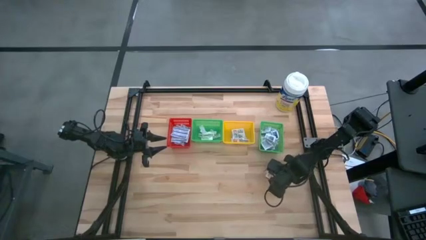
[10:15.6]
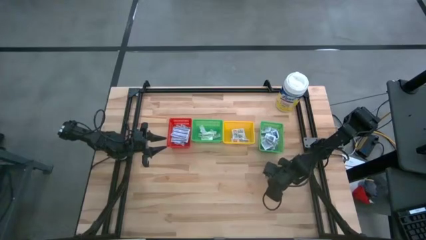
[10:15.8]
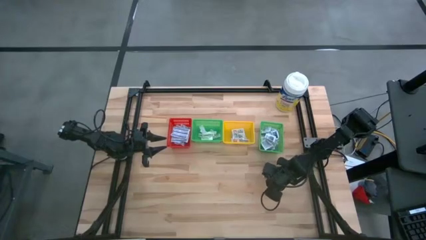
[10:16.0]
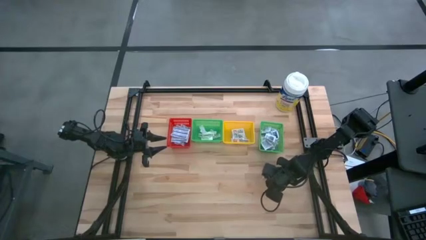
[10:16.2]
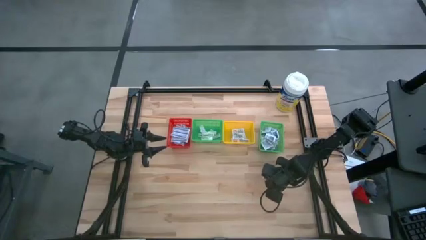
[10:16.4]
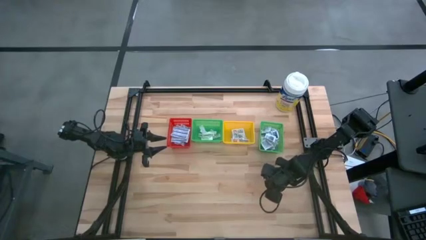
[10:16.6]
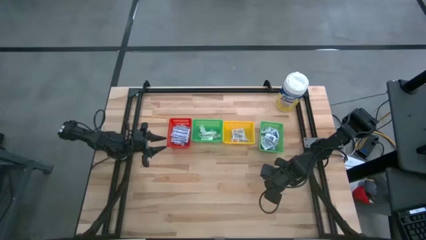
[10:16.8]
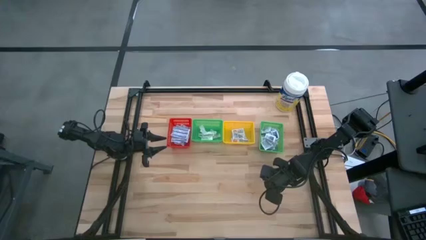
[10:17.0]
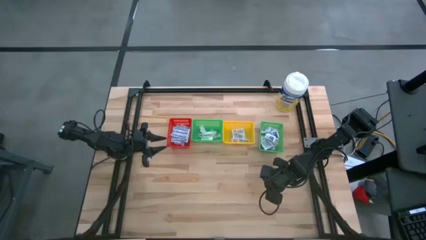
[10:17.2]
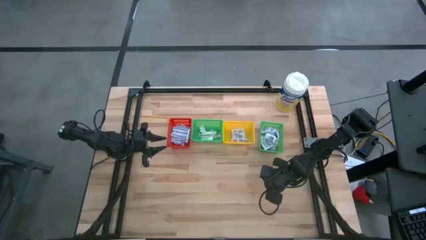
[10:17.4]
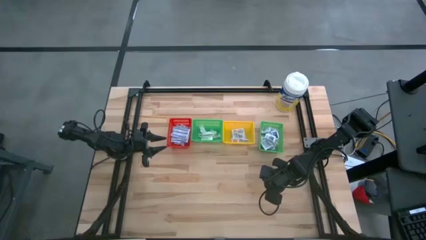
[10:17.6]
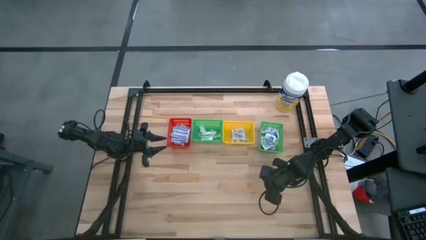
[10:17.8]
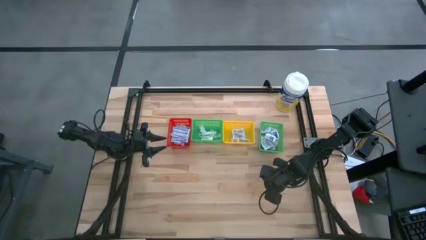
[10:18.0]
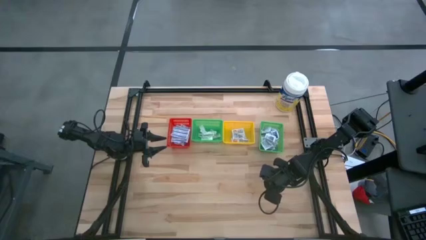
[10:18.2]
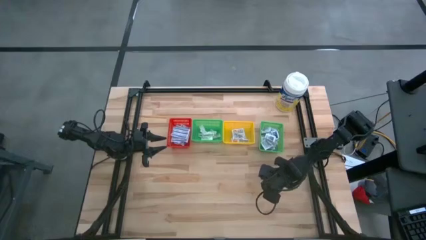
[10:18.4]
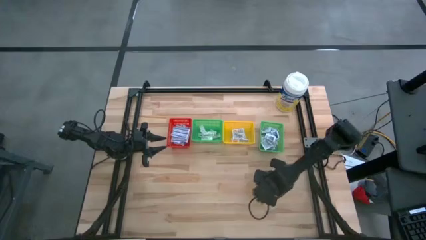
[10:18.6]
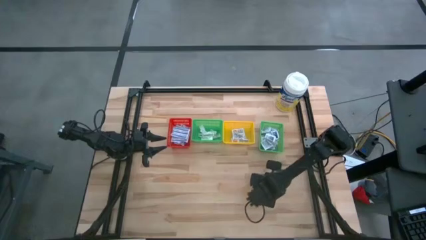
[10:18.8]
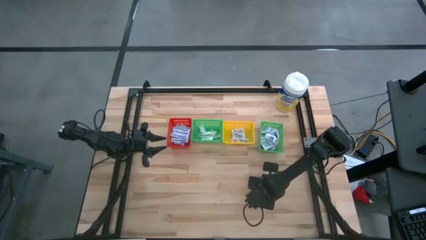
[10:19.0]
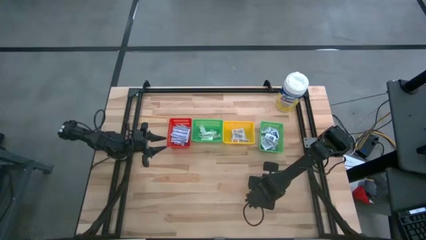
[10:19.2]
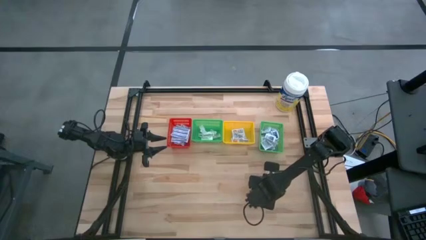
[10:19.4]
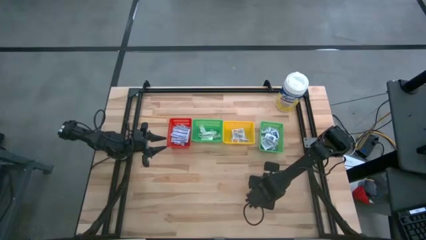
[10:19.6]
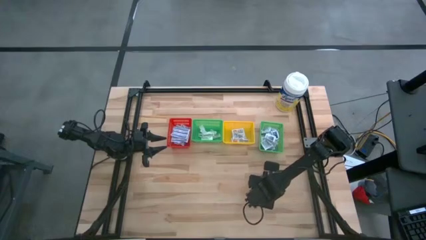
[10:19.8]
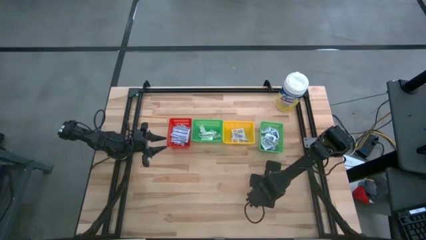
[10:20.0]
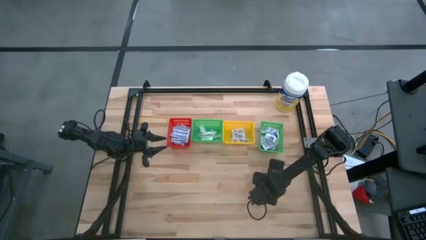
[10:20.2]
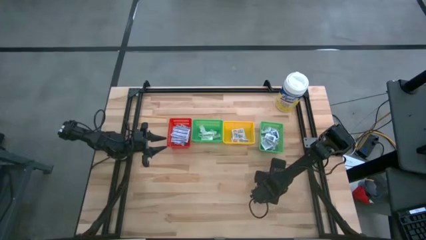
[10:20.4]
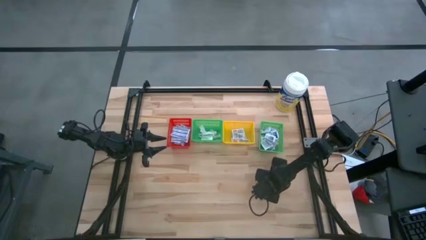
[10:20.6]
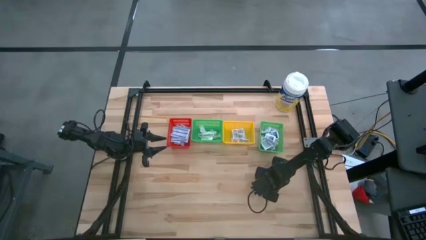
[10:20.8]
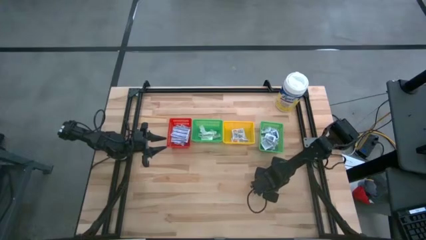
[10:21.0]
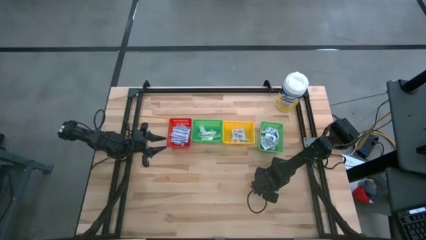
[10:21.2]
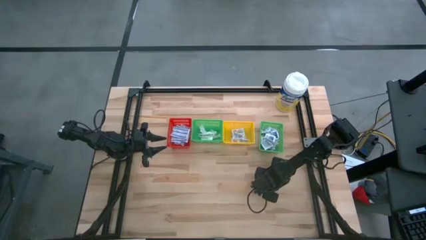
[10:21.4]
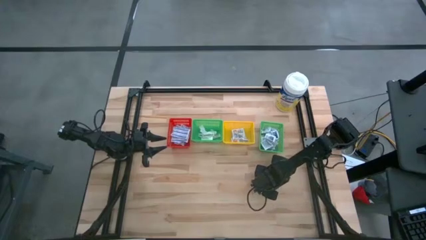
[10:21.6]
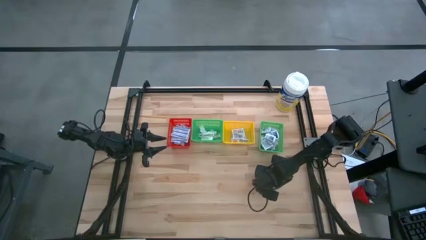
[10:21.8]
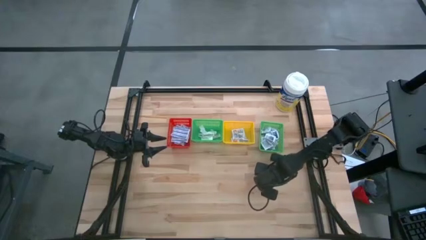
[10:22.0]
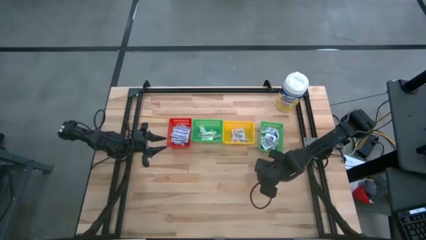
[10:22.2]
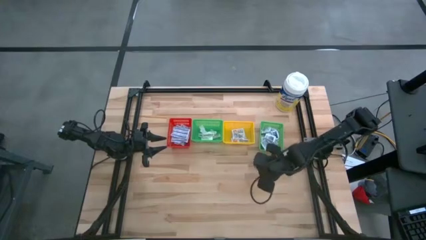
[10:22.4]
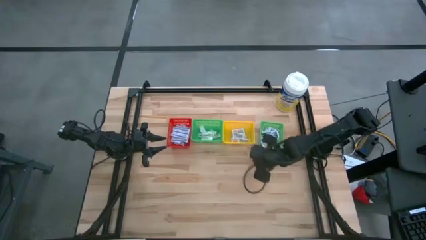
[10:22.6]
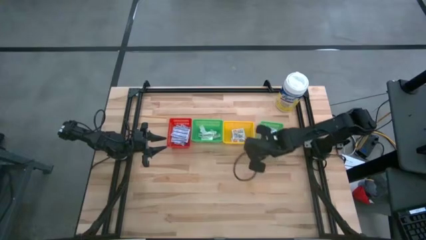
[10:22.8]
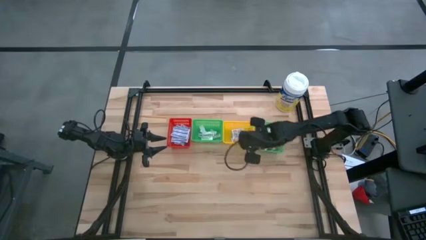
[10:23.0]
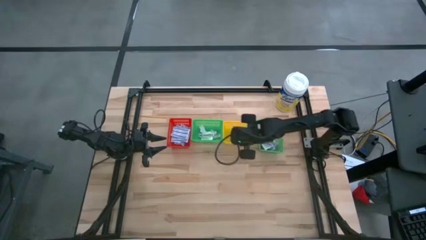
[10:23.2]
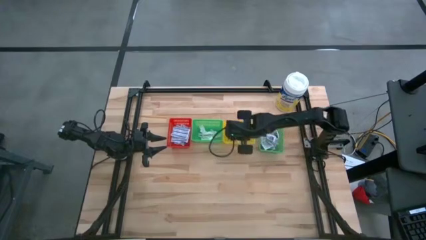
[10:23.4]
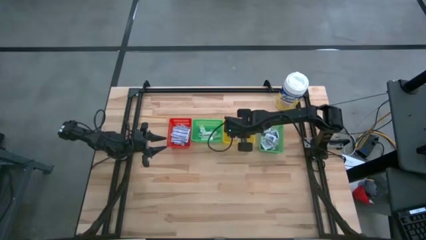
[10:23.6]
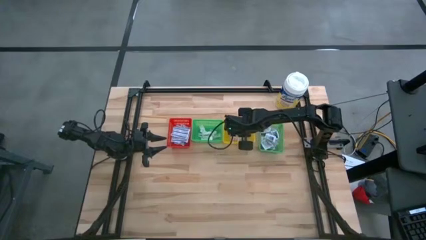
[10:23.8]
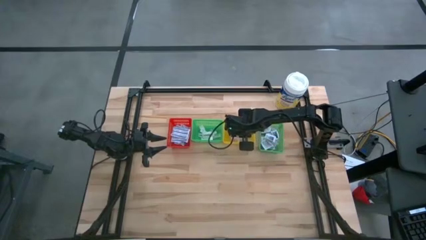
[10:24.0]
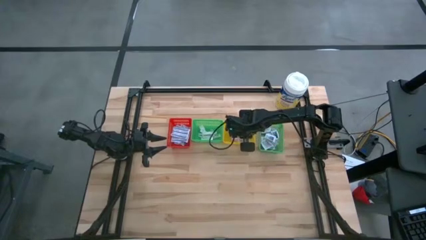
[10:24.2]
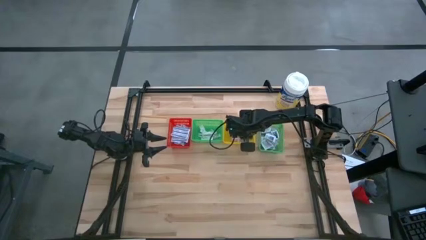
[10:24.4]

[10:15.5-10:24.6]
Task: Pick & Place First Aid Supplies
Put the orange ointment pack into the yellow bin

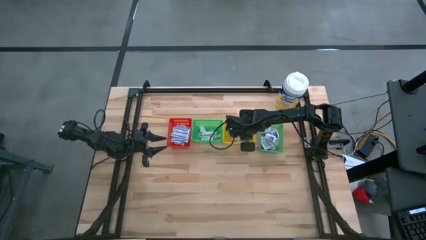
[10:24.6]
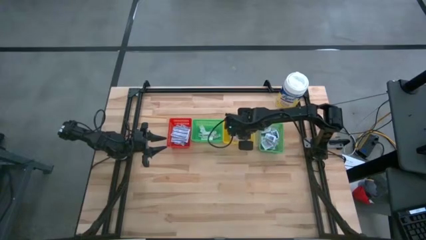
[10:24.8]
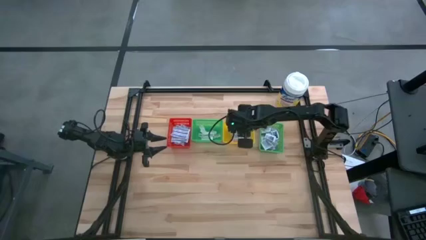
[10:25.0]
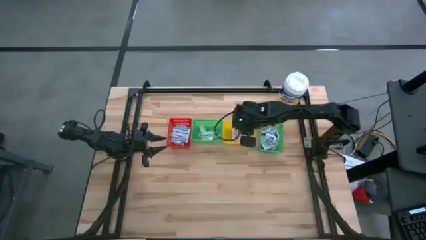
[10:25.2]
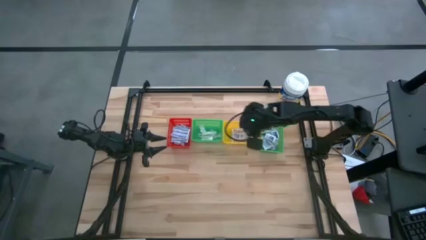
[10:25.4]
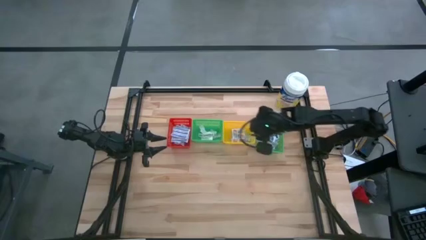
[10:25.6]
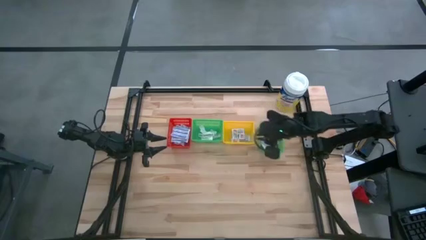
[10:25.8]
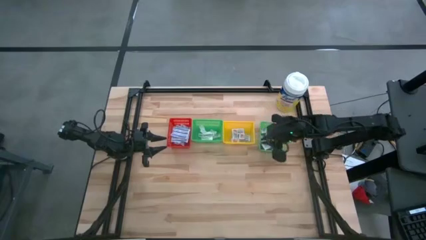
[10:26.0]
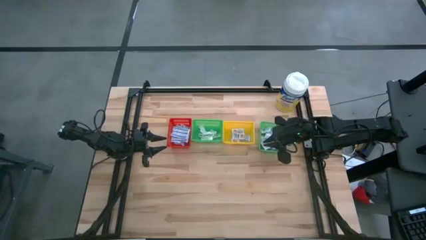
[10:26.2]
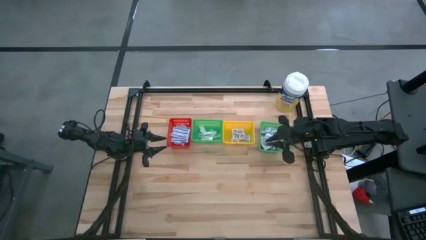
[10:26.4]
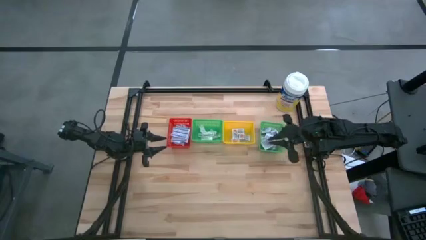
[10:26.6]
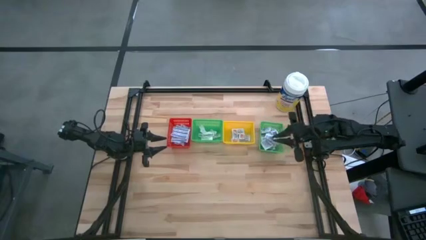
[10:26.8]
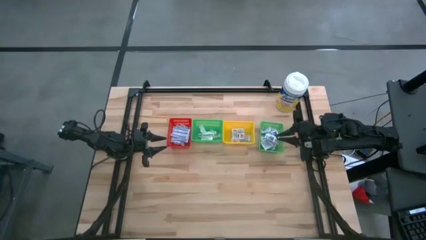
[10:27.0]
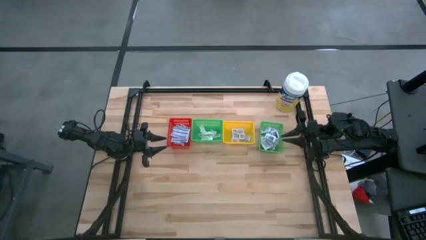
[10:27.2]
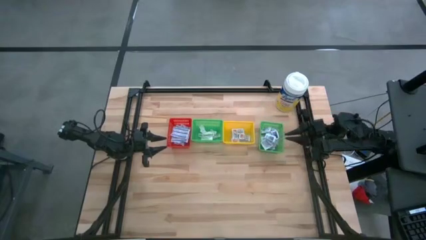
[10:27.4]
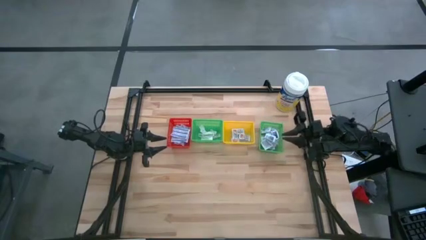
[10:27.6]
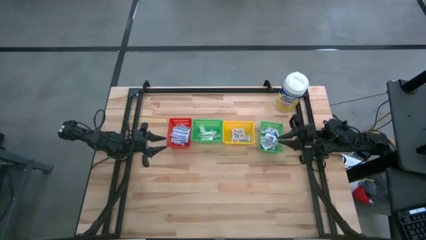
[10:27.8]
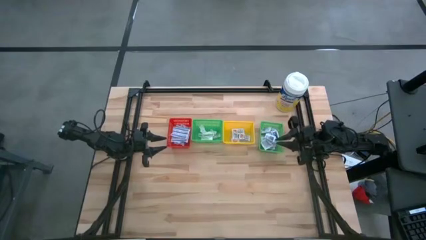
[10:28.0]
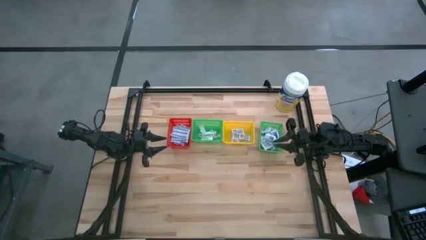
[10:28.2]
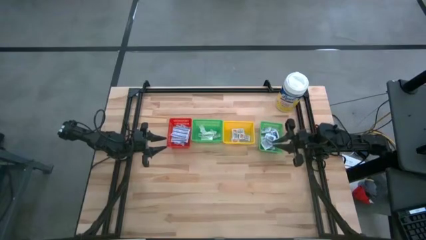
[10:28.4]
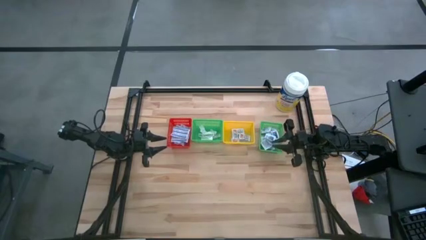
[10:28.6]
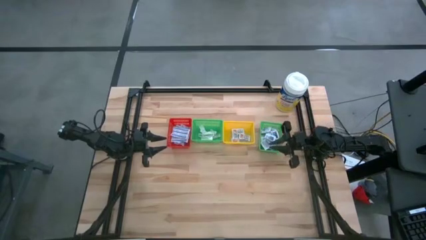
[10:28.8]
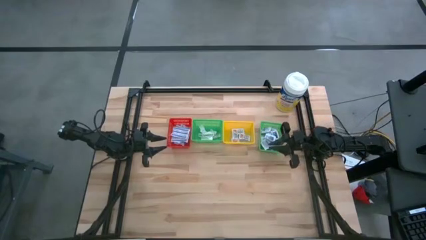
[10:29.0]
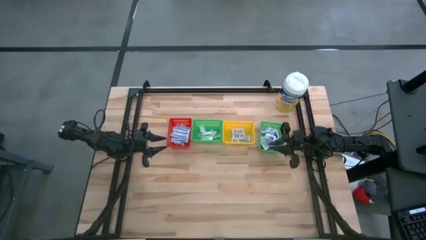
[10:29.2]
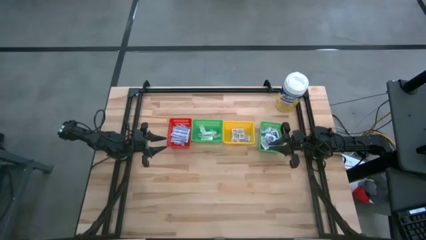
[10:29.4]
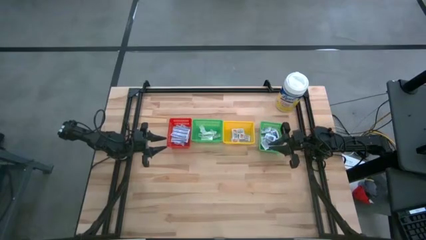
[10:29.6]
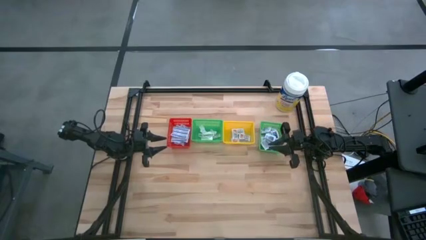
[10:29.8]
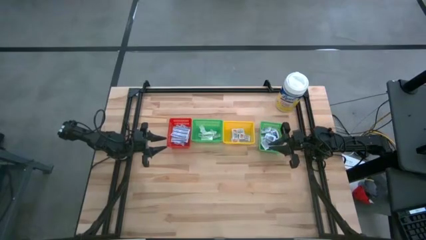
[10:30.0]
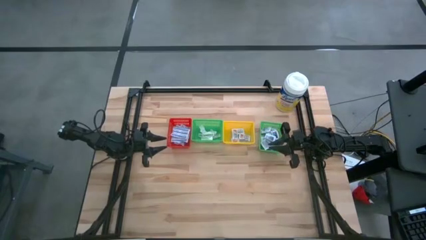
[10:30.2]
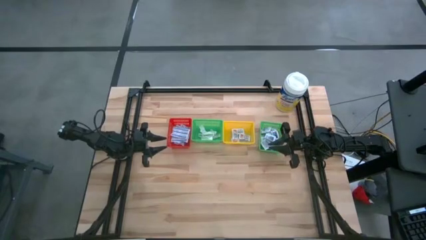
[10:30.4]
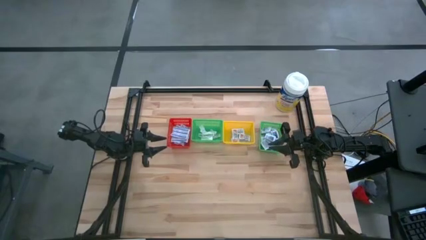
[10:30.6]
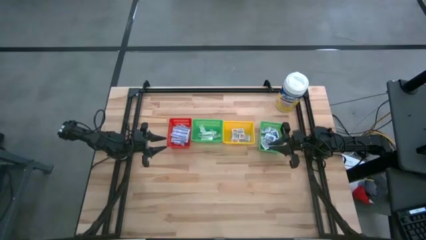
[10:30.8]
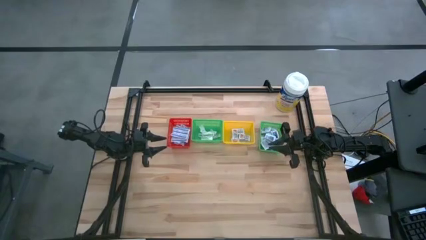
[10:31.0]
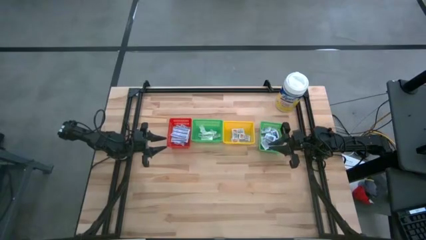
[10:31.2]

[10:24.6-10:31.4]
Return to Home Position

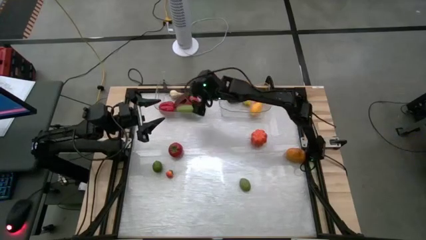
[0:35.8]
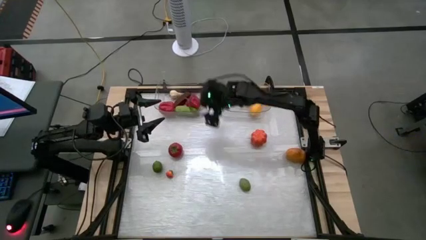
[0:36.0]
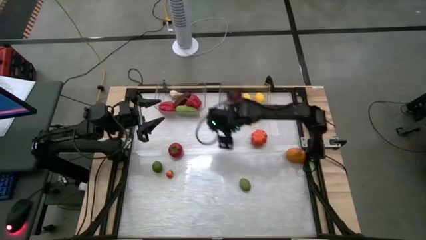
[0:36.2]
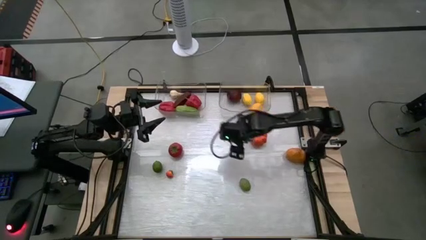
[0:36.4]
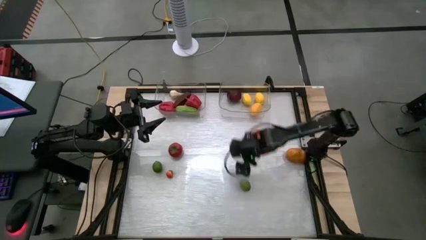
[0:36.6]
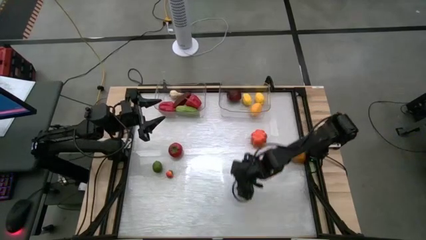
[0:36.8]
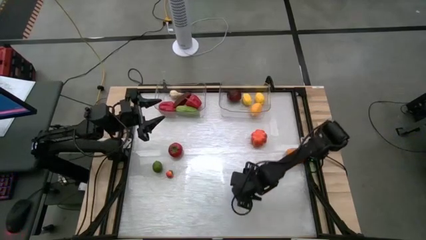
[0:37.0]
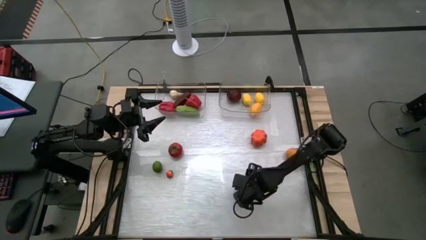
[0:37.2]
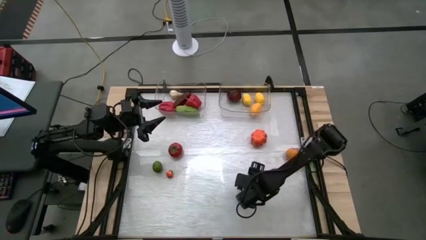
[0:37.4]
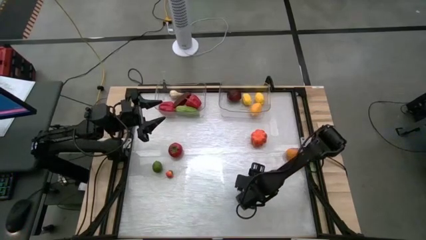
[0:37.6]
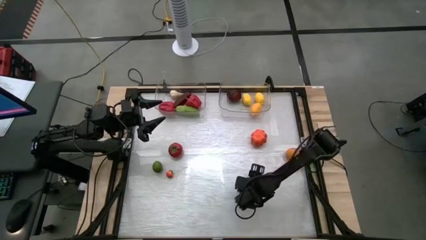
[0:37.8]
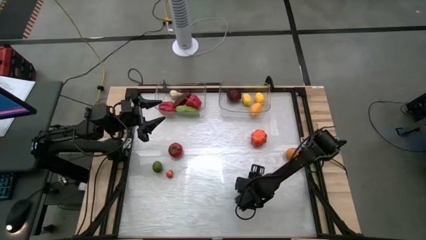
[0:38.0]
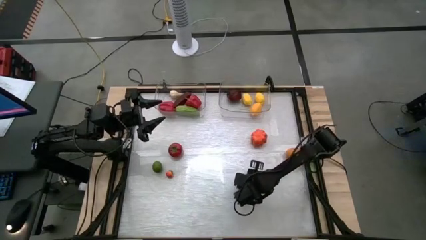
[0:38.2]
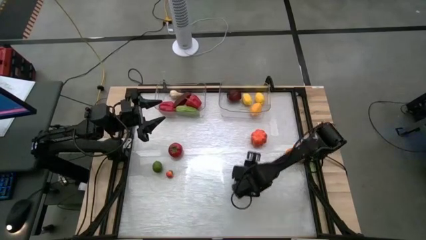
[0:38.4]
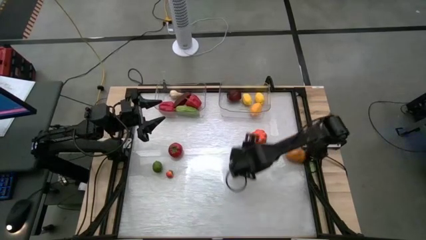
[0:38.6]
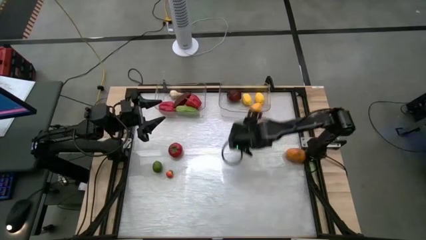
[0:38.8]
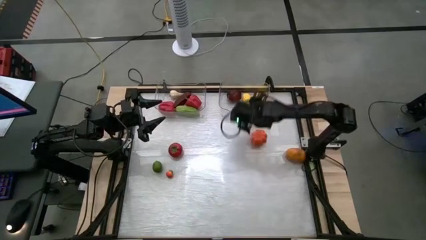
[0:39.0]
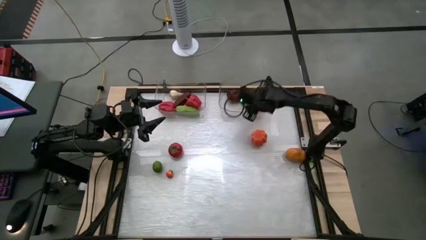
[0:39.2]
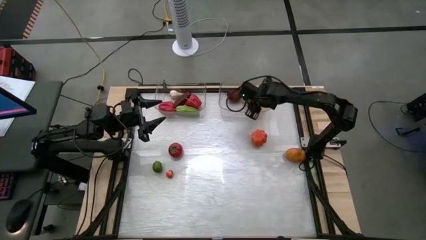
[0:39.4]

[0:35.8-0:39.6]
Task: Sort produce into baskets
Put the lime in the container
